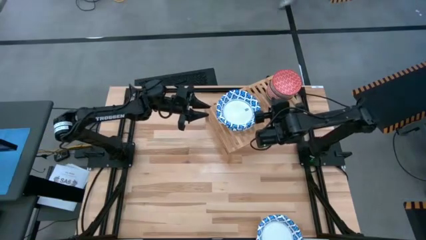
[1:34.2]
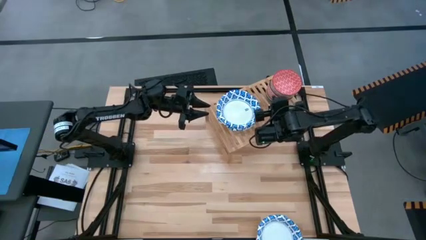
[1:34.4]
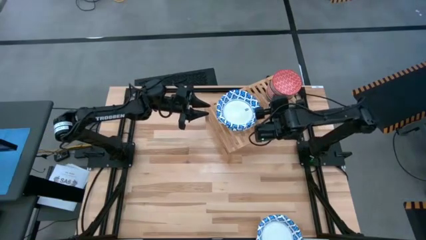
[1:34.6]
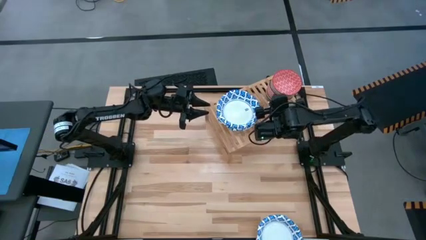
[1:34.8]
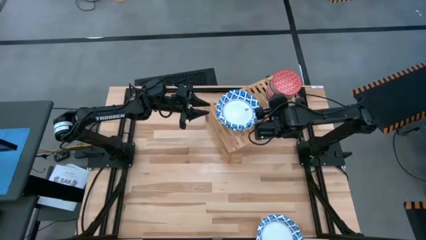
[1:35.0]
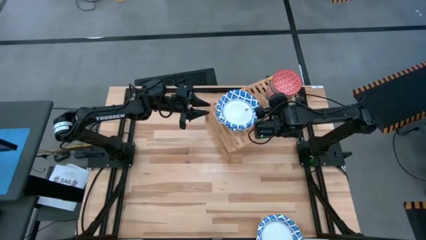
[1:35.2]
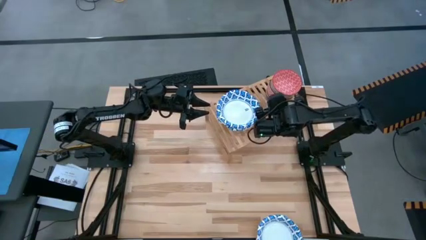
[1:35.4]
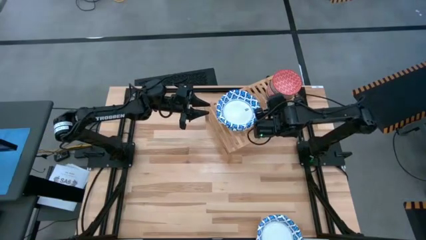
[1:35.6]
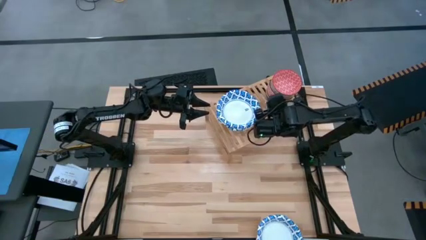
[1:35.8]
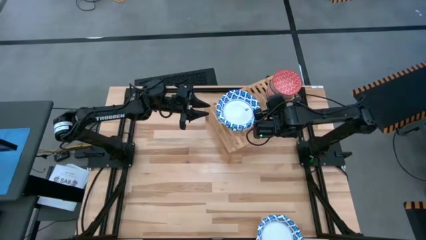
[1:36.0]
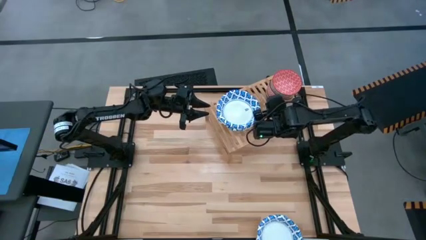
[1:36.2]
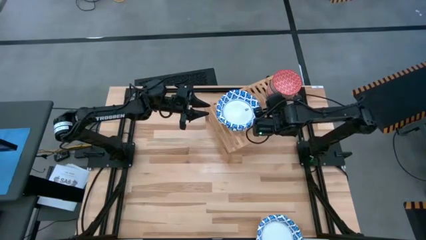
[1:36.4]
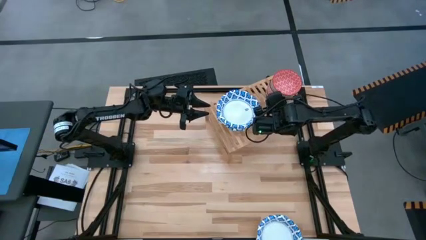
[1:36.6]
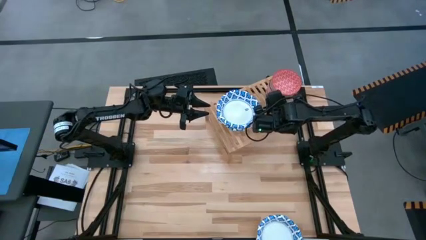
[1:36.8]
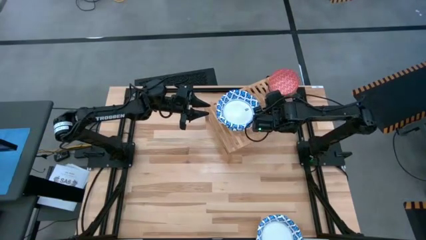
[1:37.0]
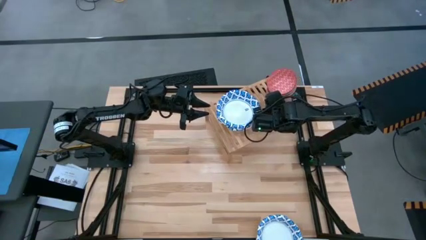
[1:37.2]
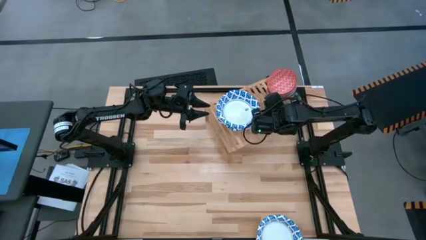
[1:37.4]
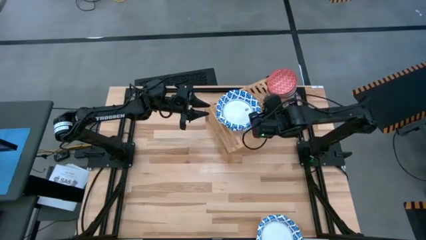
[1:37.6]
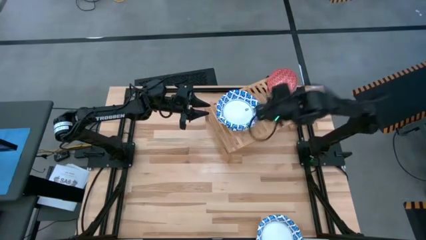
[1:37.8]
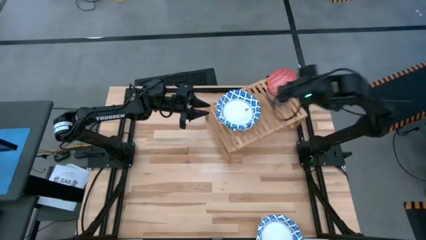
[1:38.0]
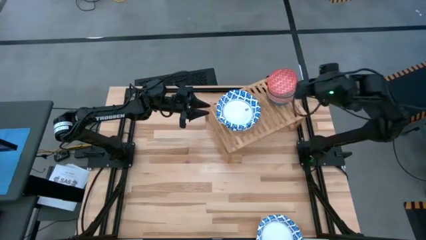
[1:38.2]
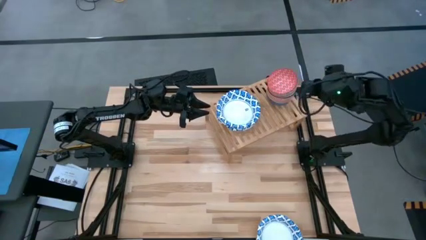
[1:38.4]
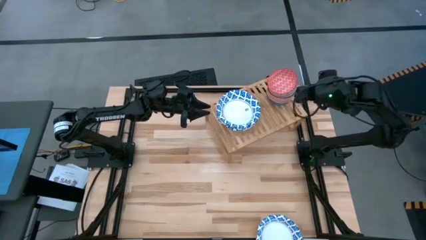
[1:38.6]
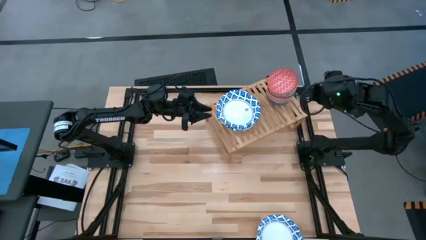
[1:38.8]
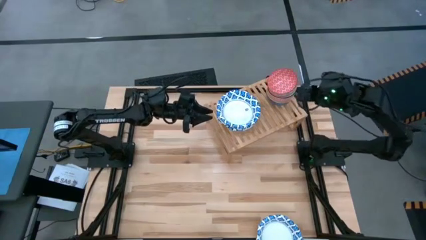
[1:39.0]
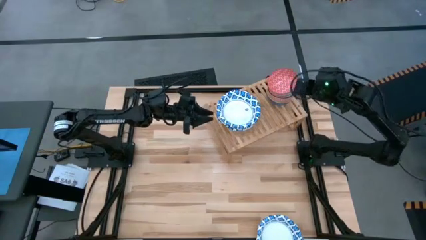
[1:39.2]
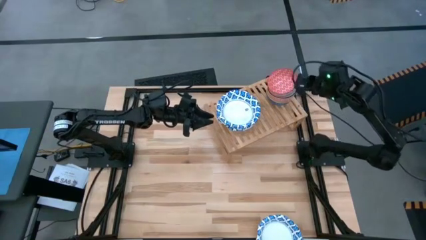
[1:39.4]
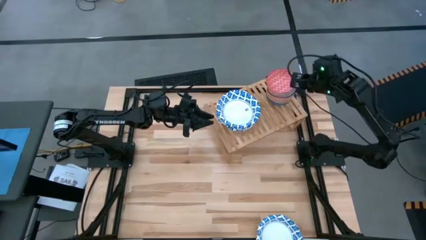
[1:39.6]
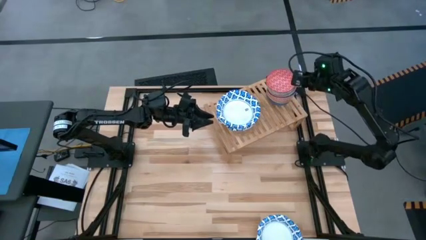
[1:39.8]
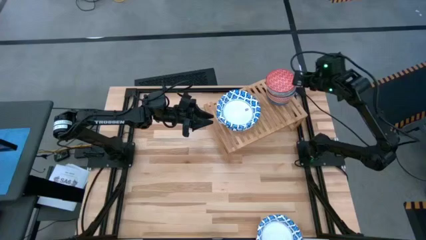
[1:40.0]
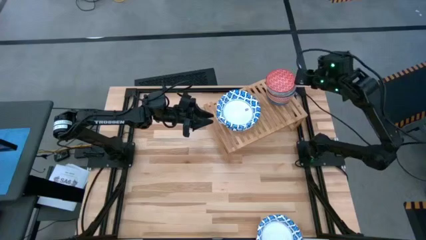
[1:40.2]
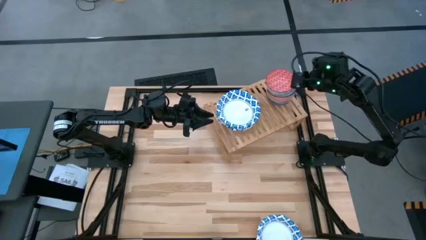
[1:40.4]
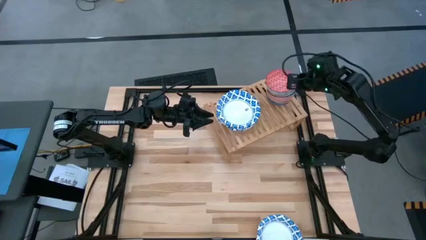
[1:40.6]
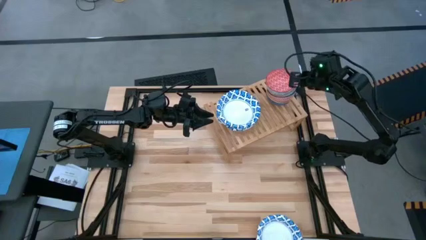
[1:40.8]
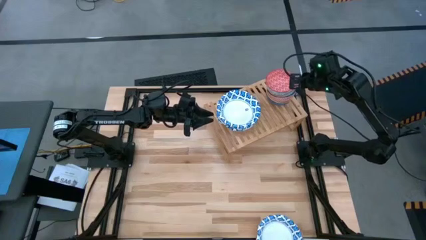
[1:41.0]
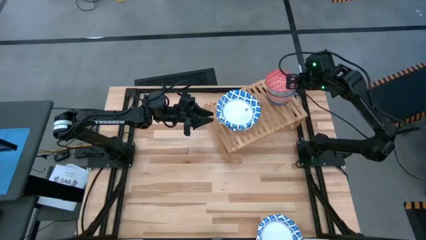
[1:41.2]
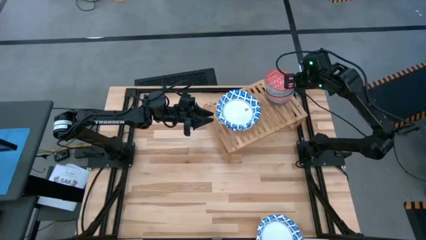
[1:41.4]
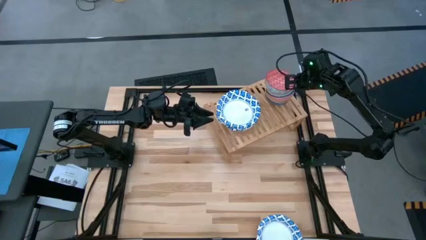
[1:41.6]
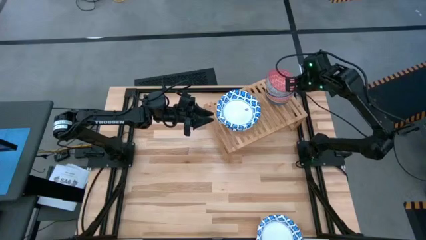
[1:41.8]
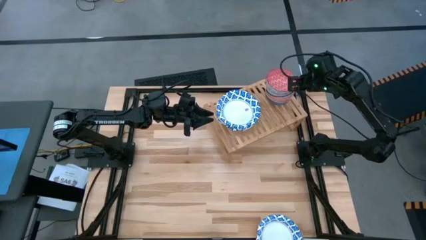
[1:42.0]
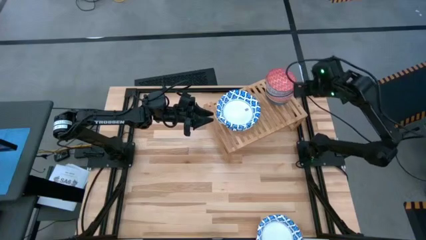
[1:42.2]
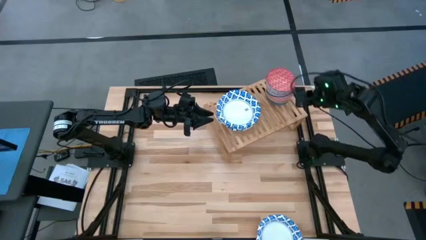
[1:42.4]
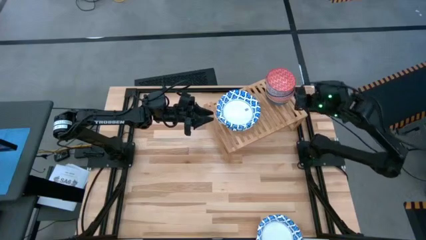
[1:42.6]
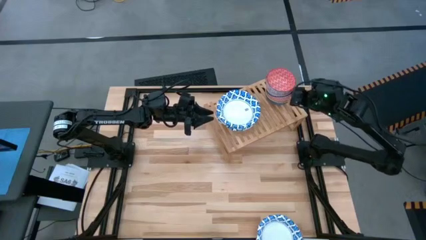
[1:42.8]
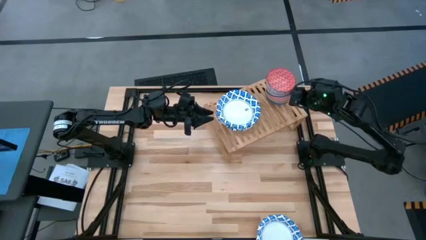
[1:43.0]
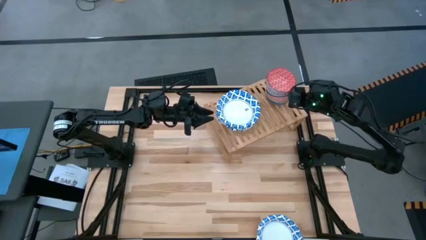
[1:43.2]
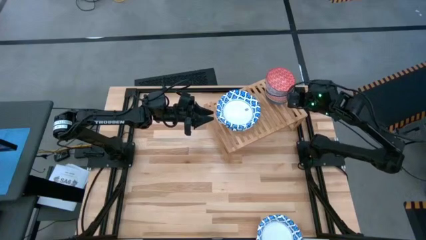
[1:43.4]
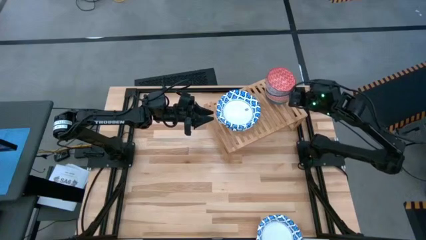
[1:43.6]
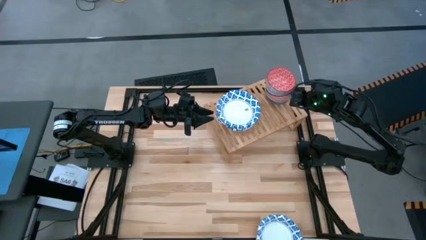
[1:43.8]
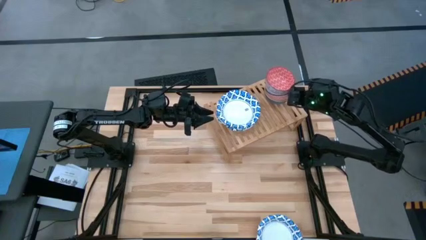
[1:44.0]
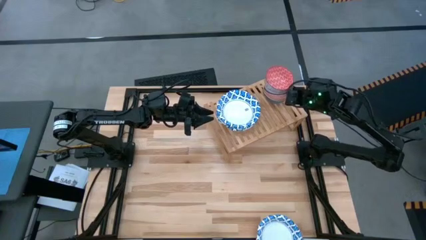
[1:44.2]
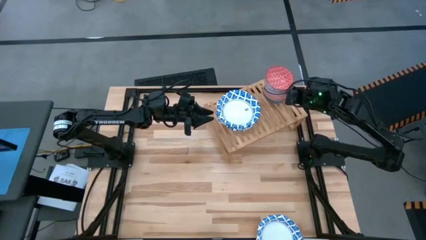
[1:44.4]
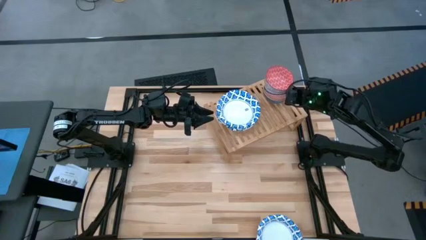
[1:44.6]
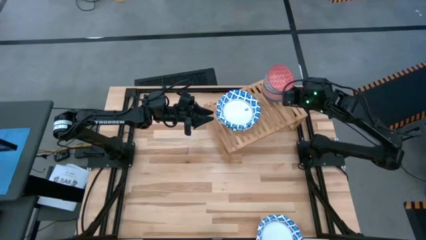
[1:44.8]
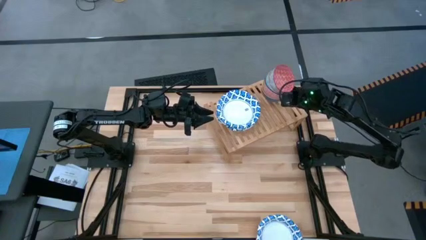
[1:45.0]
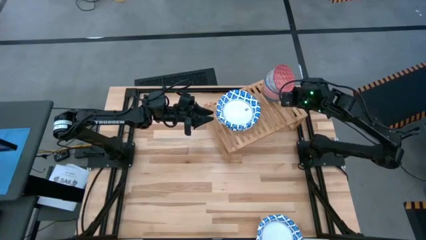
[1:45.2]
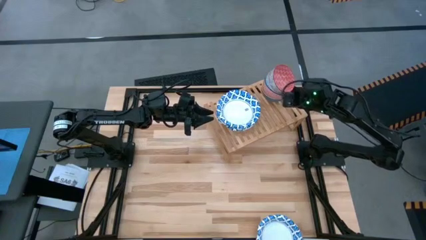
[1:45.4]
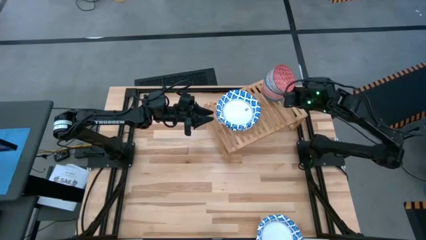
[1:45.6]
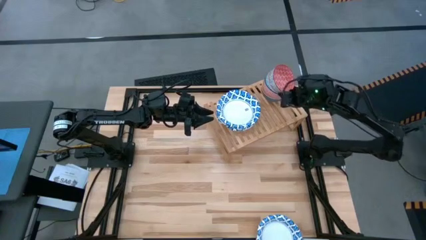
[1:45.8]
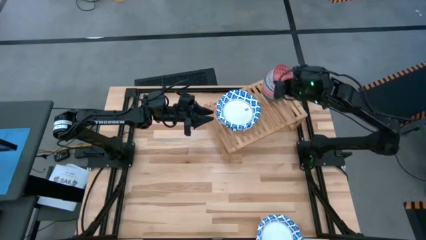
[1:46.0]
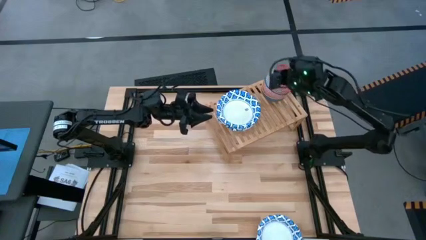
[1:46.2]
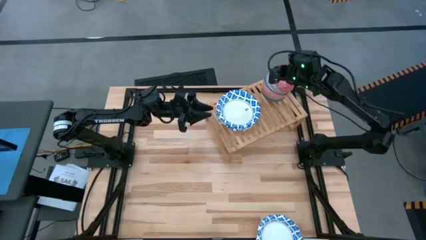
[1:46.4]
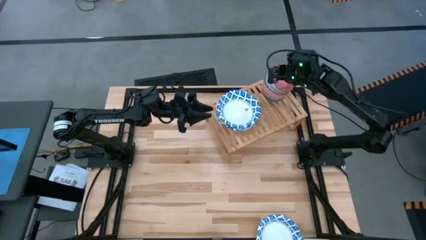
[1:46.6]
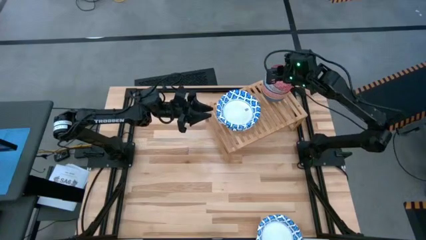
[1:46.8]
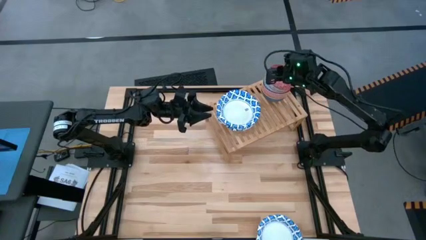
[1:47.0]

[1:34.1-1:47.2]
Task: Place and stack bowls onto a shelf
Adjust the colored pattern bowls on the shelf
